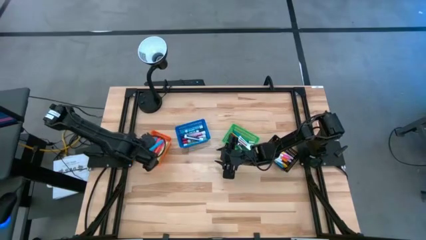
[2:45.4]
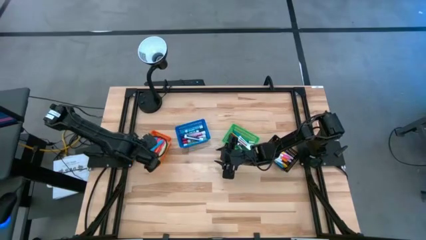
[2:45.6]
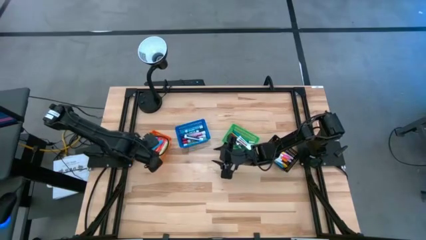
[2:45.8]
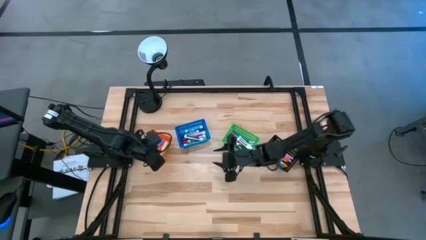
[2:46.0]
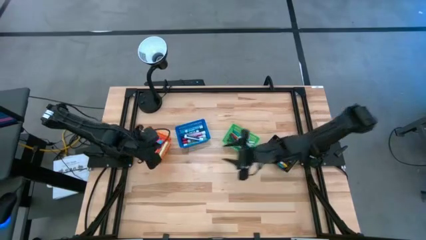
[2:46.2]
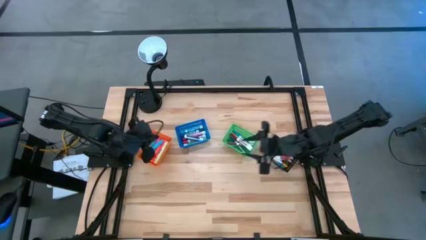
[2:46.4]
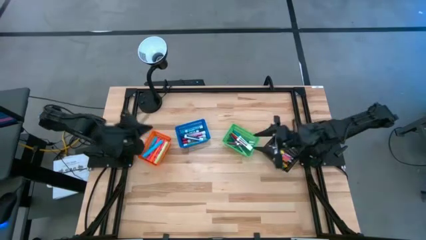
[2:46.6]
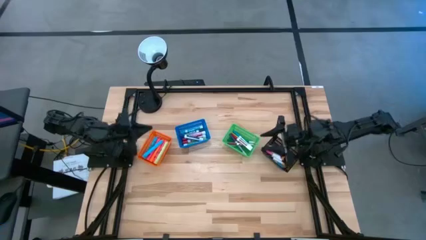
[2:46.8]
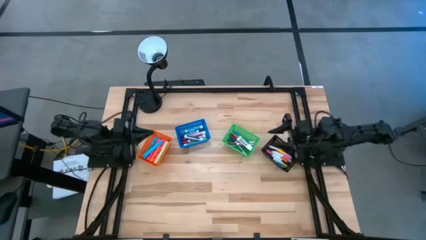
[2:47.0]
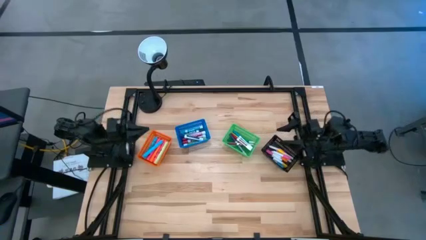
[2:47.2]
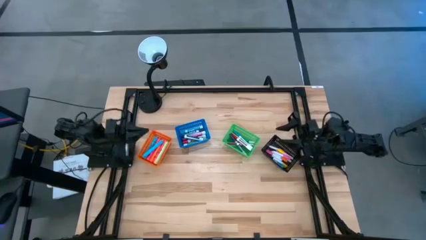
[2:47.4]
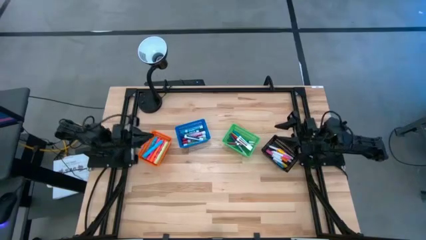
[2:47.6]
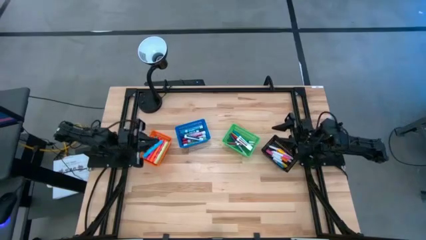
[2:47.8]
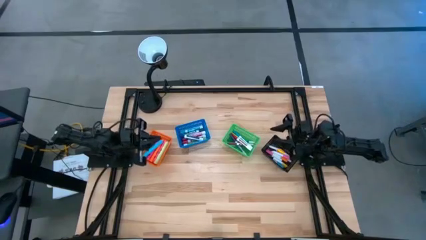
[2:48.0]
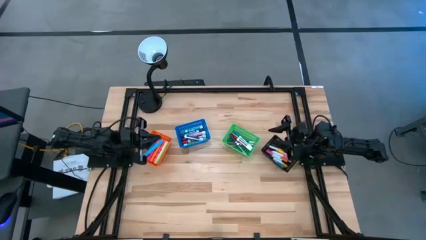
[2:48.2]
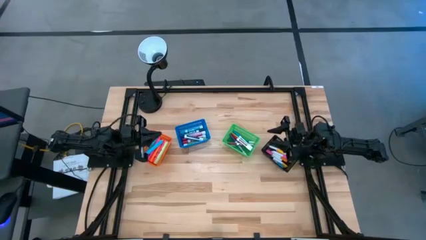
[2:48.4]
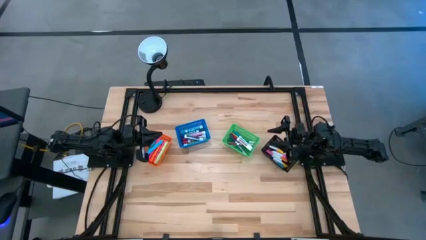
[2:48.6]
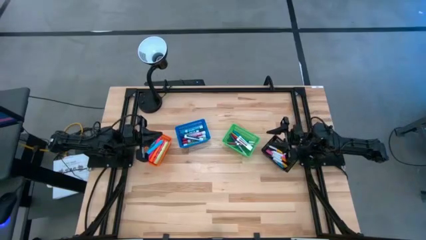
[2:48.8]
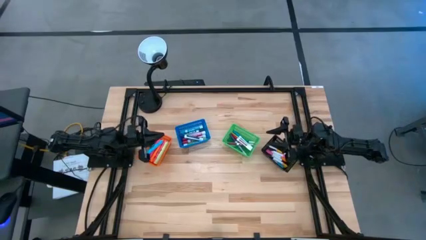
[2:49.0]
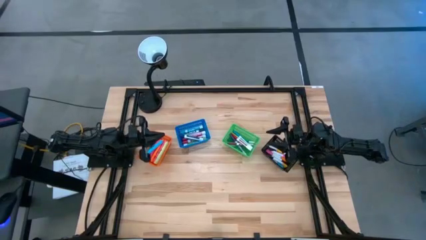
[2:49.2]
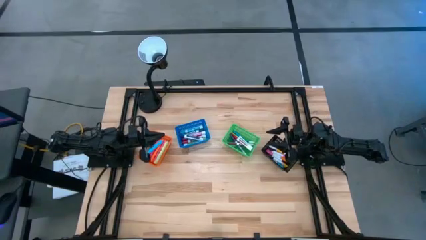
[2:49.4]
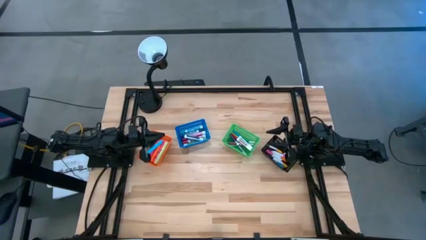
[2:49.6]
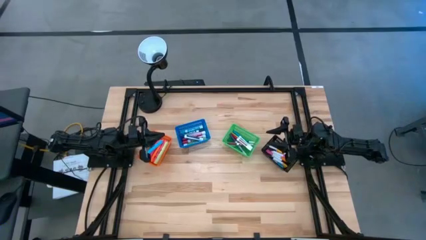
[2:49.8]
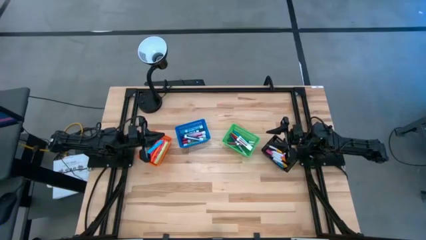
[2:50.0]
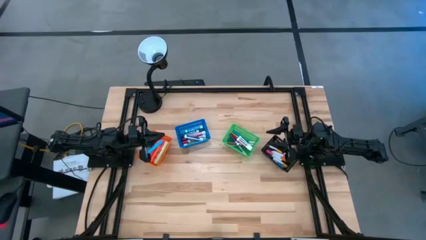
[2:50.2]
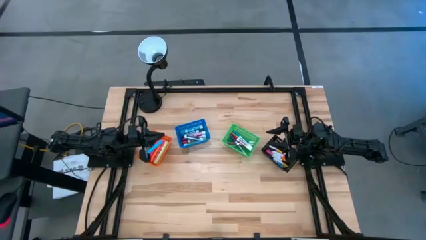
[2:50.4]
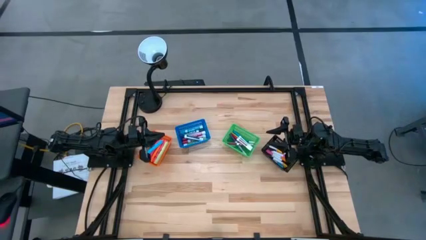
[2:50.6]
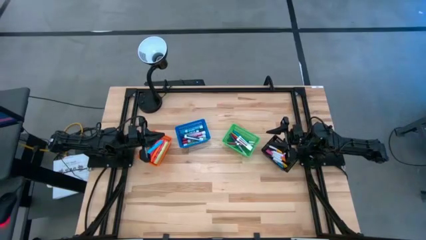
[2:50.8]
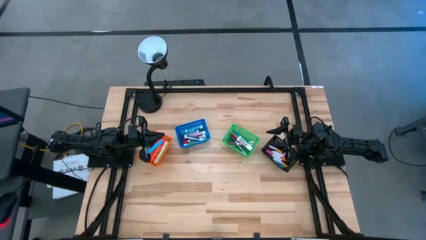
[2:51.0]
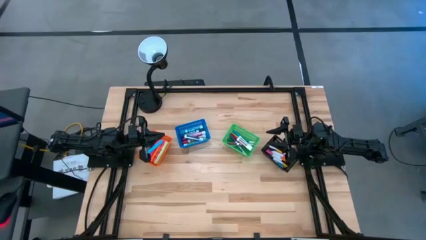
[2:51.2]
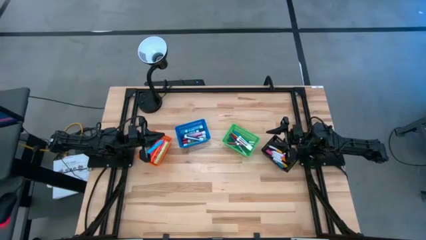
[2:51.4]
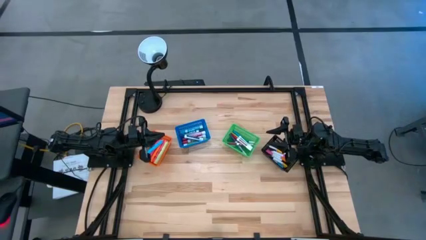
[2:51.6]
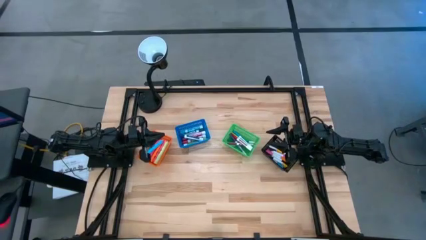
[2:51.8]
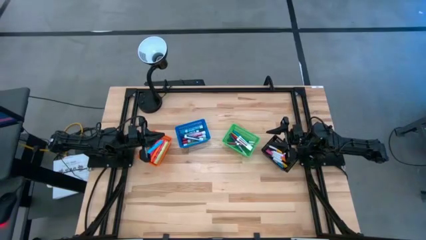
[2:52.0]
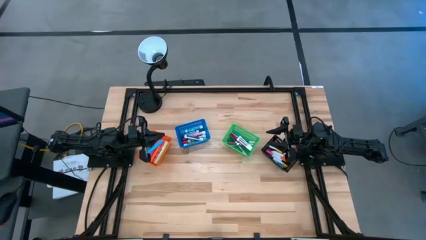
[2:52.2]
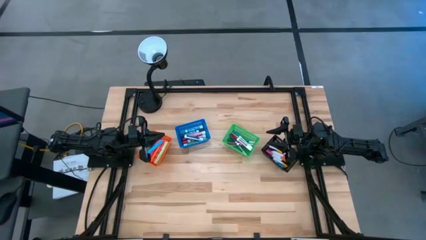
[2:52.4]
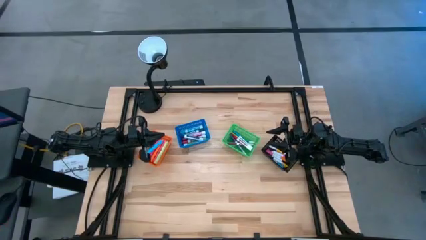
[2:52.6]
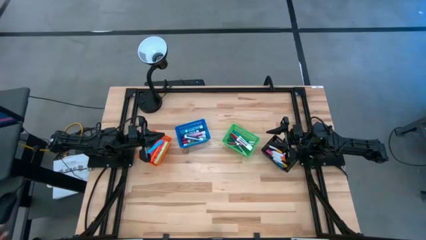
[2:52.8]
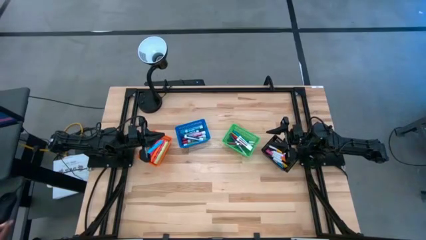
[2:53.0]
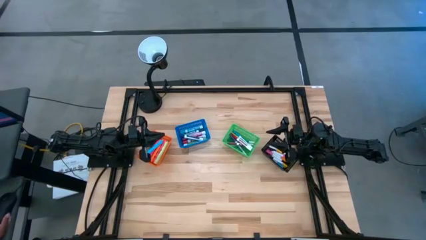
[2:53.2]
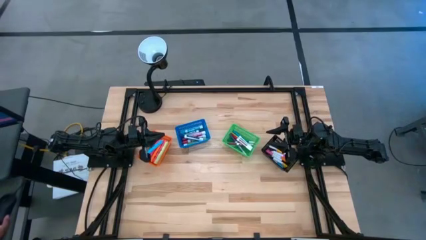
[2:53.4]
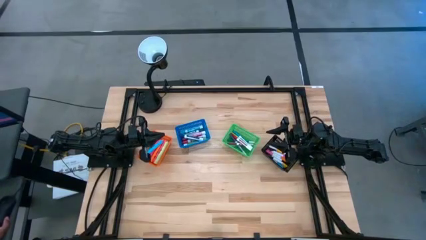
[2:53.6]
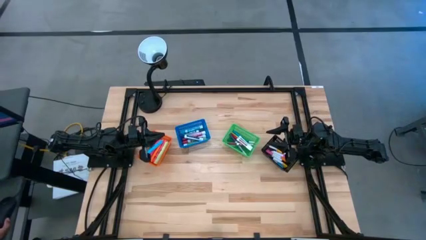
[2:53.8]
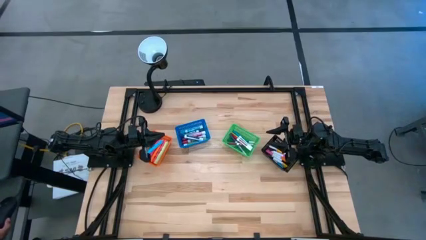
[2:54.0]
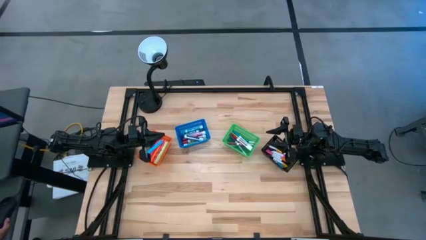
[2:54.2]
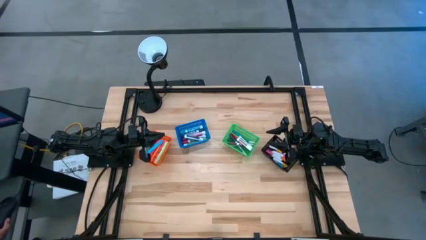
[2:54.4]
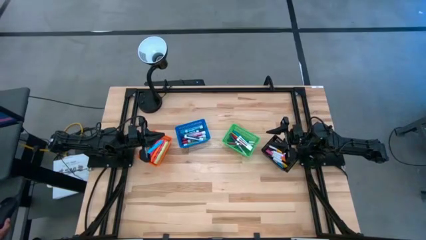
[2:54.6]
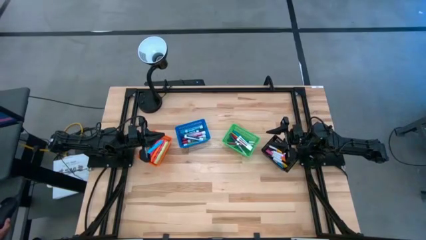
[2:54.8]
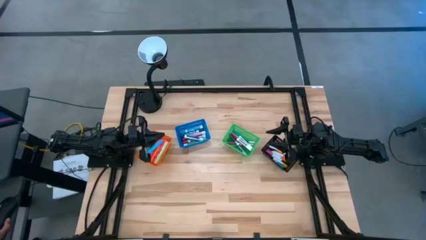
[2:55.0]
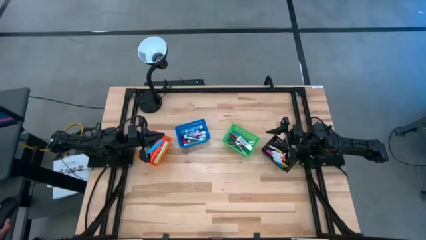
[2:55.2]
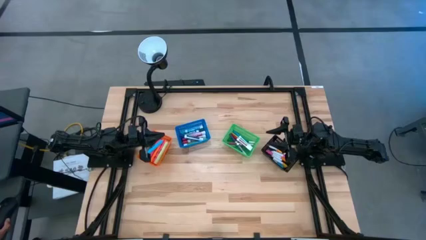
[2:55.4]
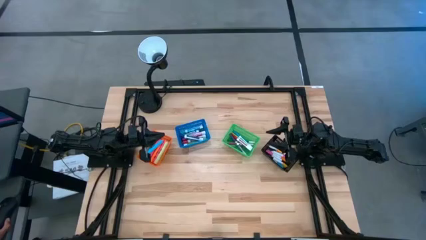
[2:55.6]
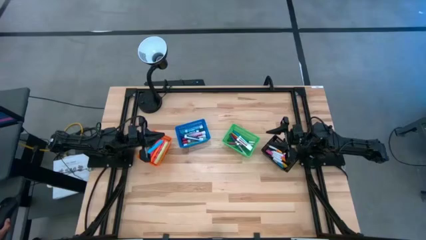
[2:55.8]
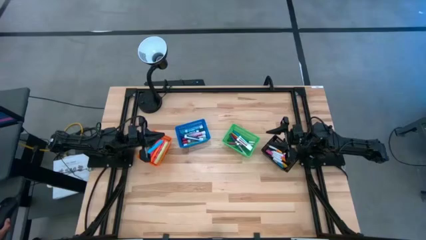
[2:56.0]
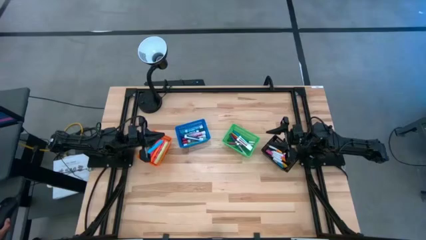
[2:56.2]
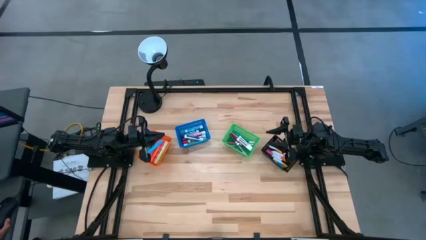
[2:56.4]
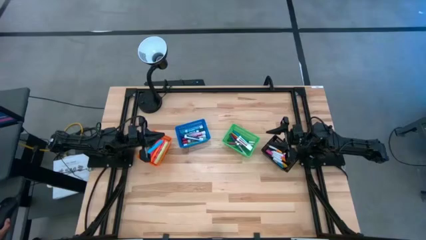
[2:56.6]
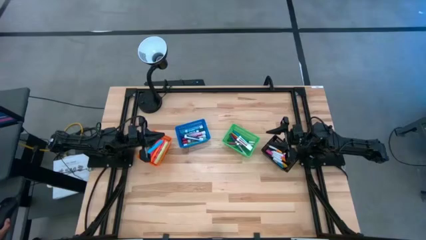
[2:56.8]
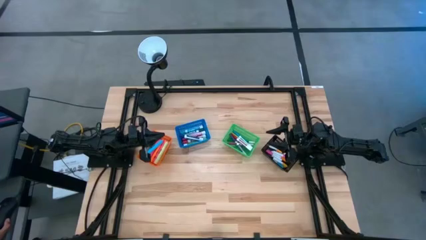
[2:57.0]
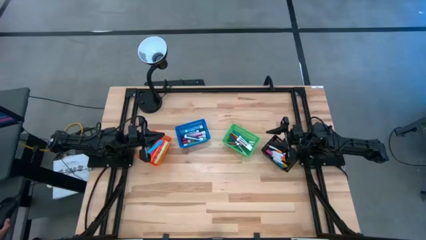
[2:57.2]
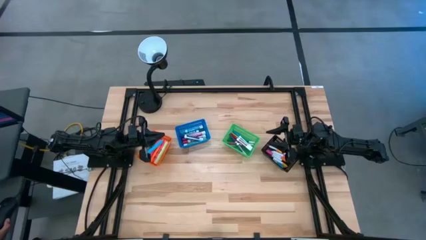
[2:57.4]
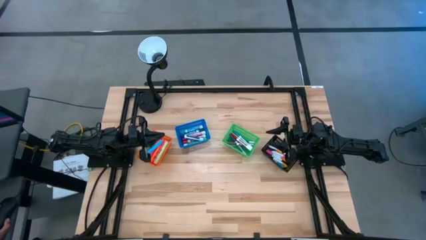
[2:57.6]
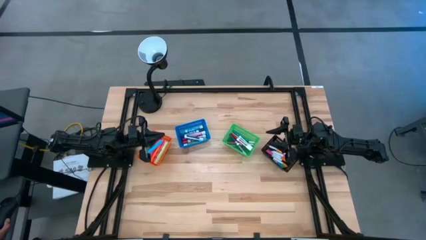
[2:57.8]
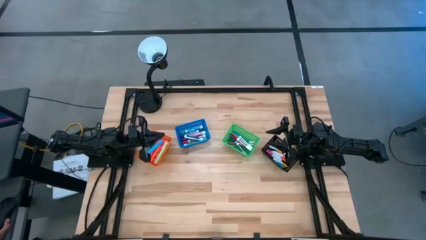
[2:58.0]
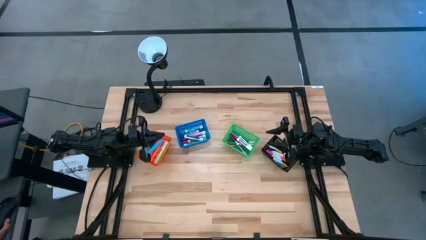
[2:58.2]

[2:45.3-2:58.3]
Task: Pick & Place Markers
Return to Home Position

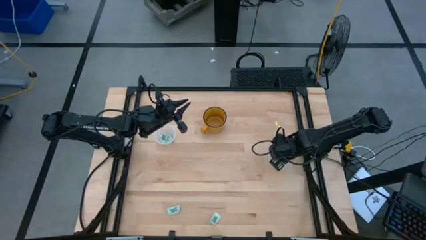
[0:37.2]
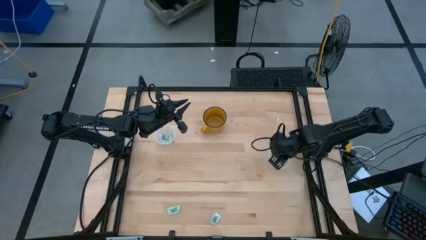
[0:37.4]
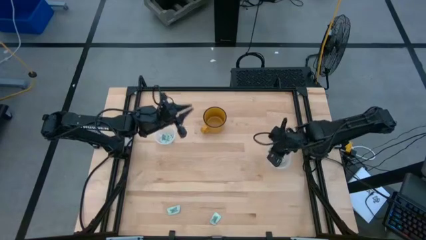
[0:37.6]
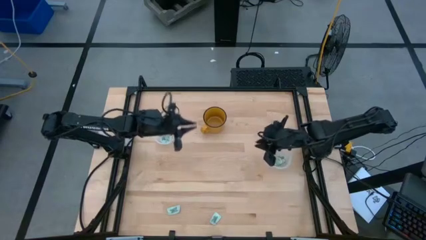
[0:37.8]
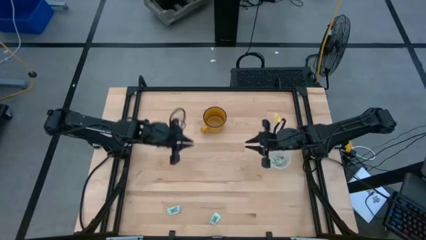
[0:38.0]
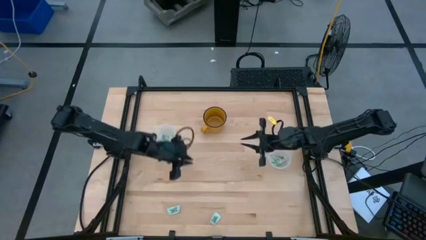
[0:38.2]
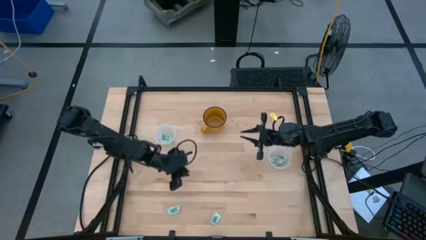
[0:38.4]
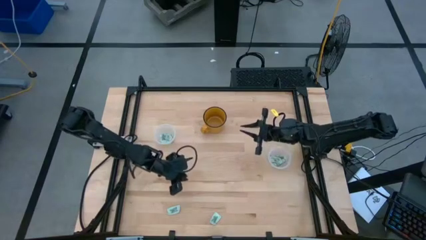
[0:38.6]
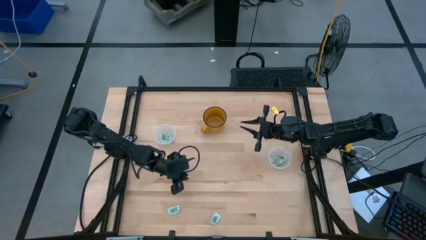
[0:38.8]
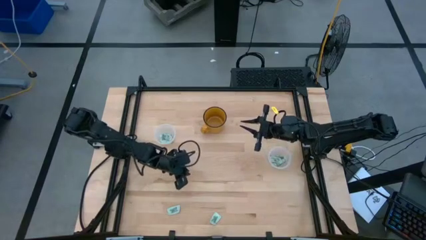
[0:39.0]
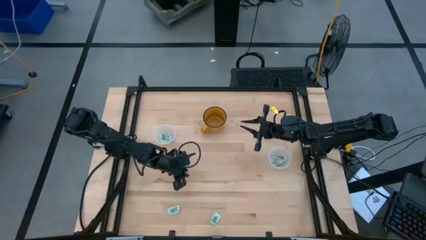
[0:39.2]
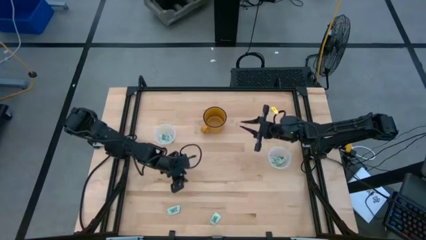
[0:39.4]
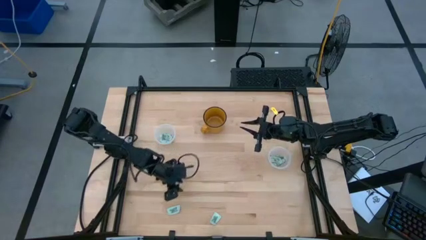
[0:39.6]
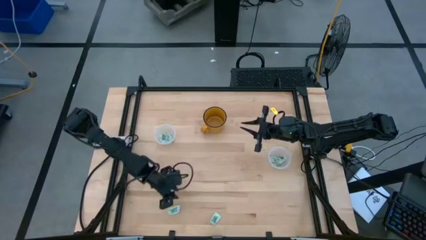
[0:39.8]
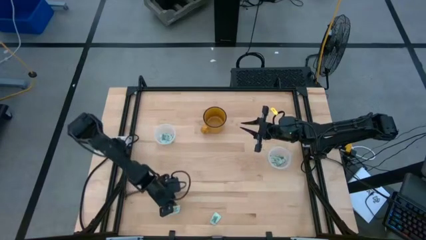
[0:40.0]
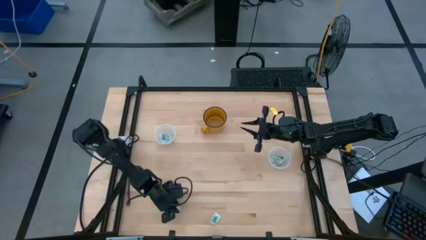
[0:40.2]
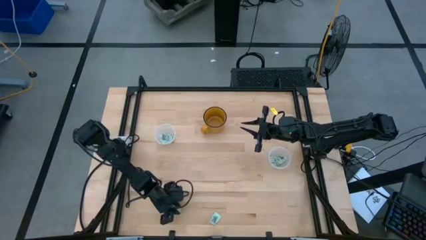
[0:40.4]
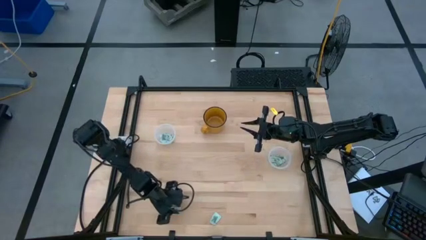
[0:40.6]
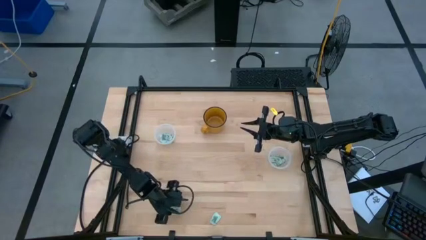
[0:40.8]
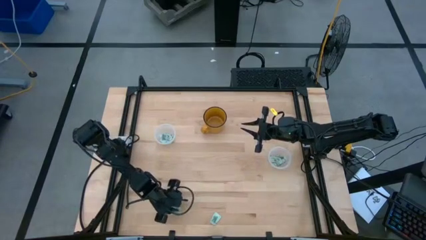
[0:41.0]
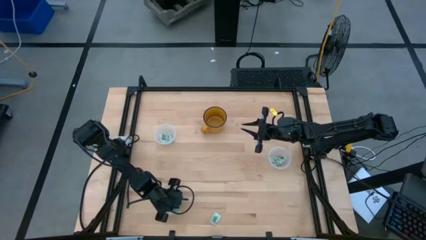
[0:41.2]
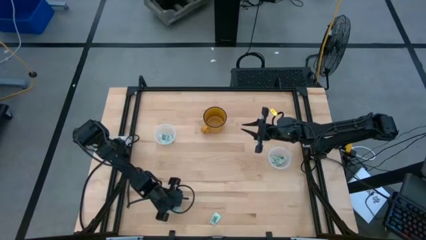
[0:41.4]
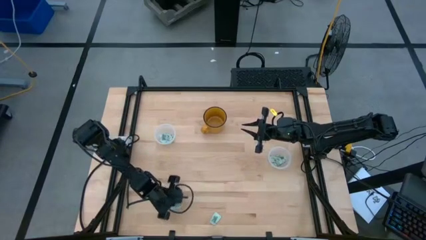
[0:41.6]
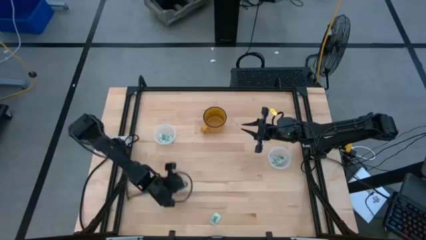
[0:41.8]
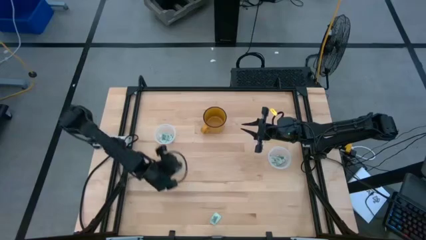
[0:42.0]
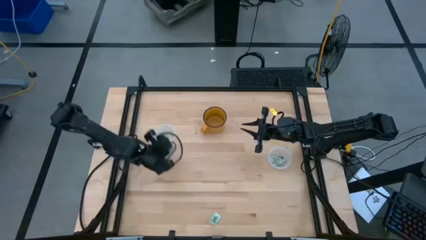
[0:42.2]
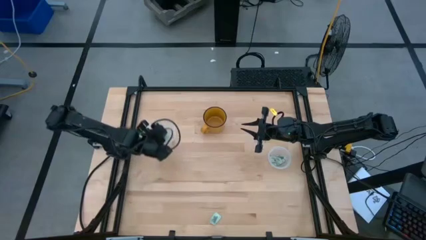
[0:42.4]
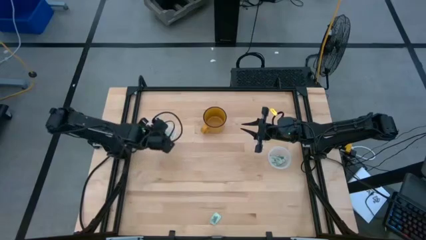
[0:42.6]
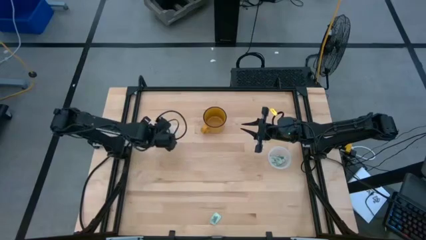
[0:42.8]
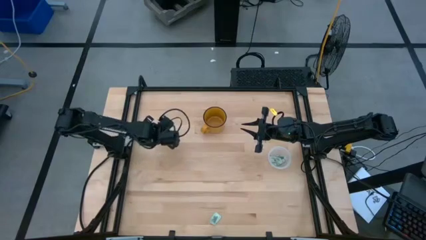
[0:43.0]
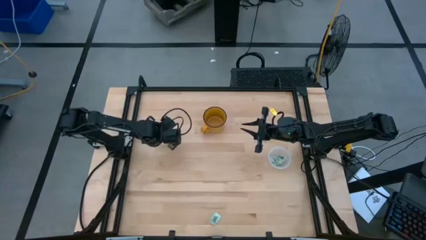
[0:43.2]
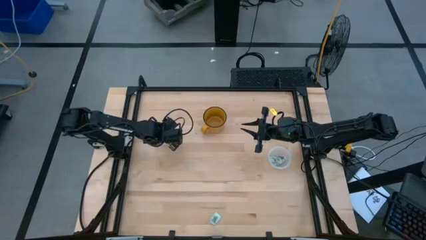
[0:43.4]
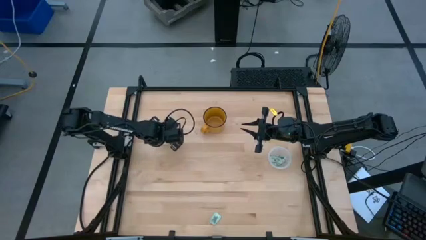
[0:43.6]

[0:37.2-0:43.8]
Task: Pick and place Stevia / Truvia into bins
Put the light green stevia packet into the left transparent container
